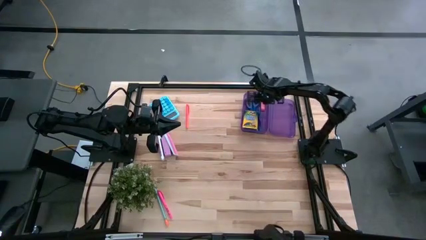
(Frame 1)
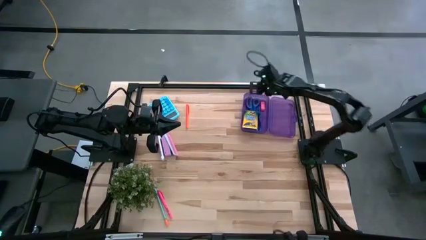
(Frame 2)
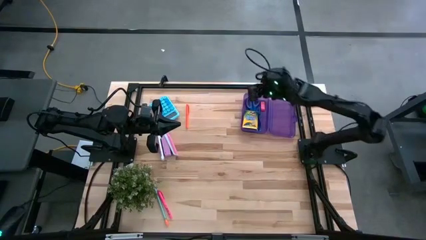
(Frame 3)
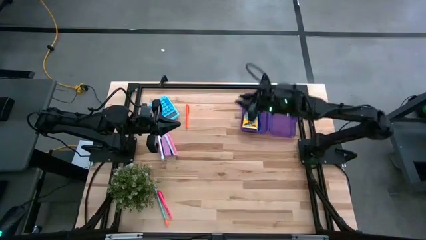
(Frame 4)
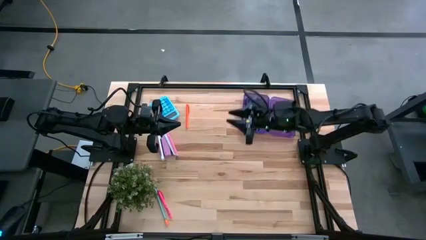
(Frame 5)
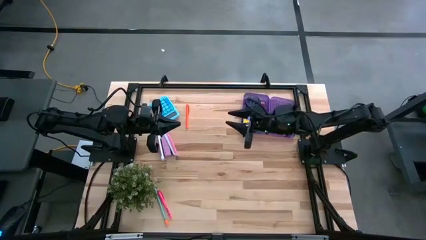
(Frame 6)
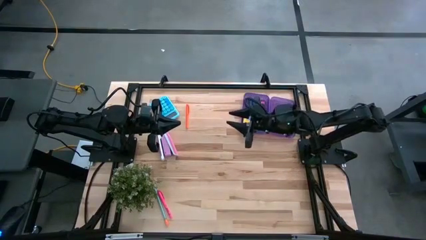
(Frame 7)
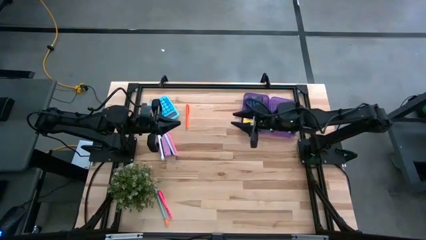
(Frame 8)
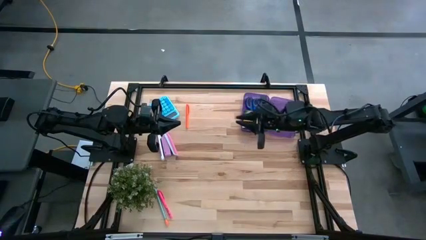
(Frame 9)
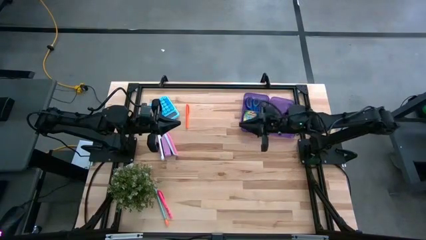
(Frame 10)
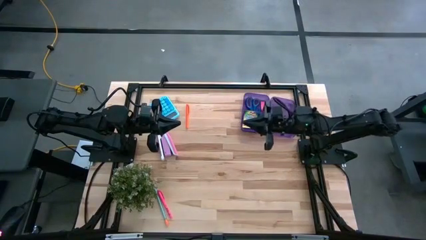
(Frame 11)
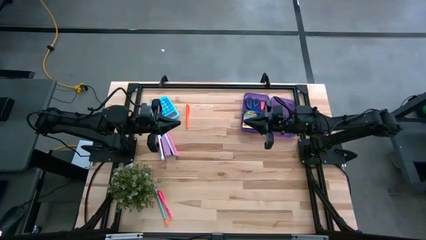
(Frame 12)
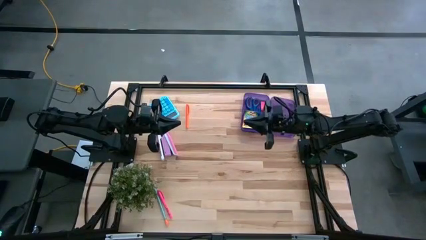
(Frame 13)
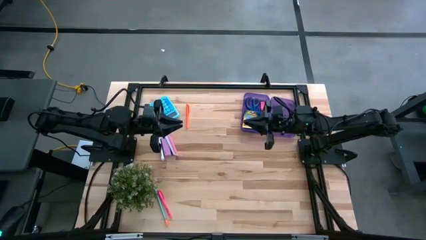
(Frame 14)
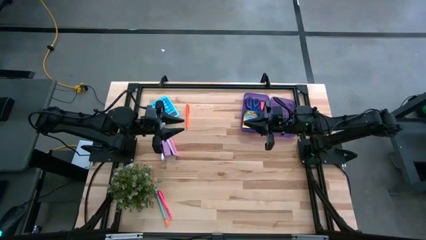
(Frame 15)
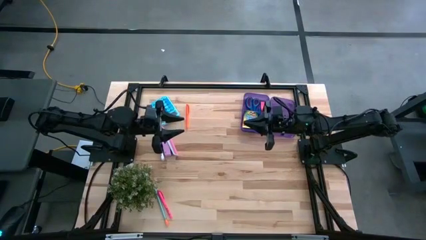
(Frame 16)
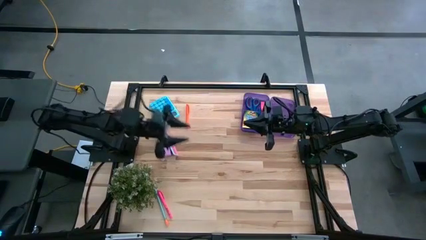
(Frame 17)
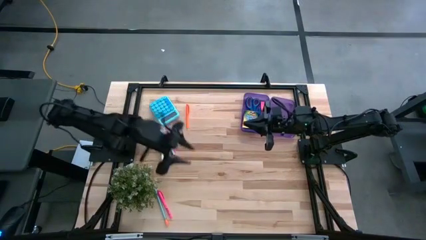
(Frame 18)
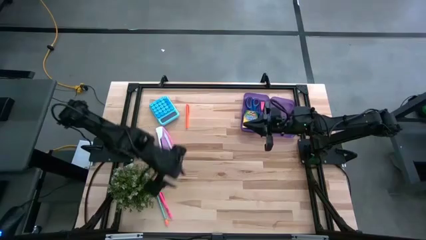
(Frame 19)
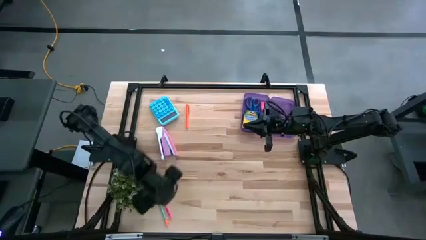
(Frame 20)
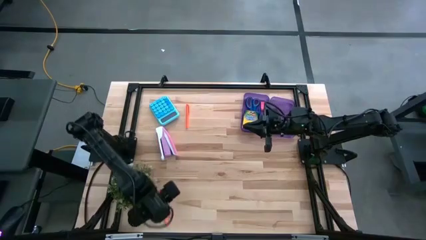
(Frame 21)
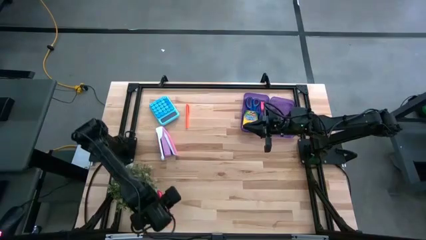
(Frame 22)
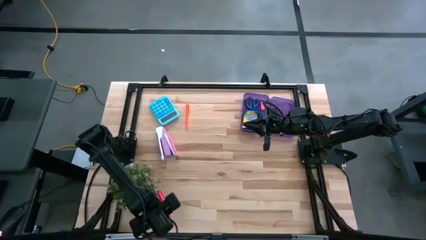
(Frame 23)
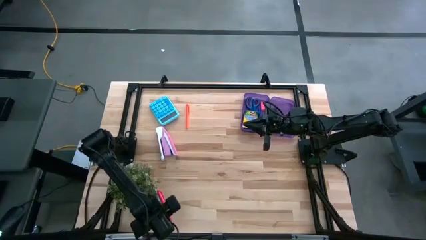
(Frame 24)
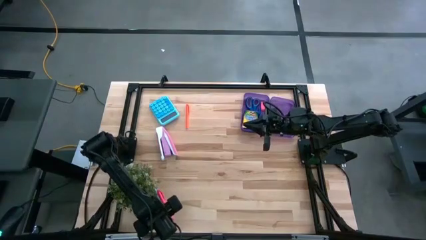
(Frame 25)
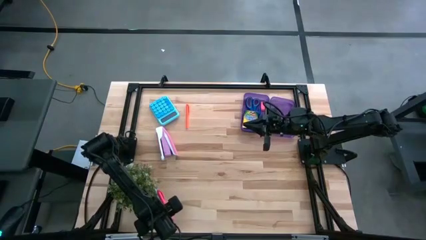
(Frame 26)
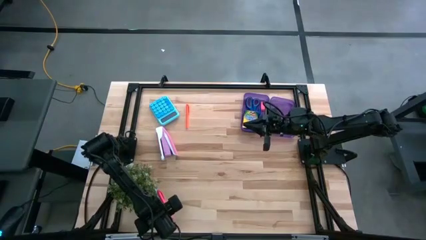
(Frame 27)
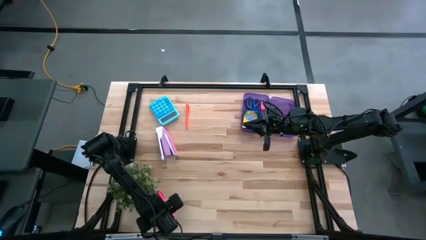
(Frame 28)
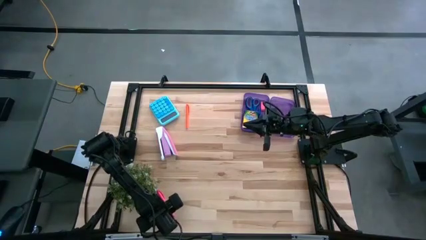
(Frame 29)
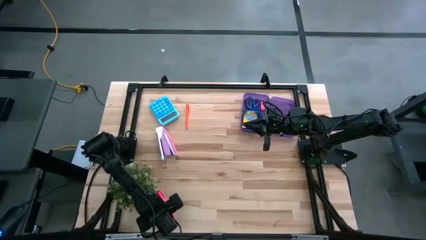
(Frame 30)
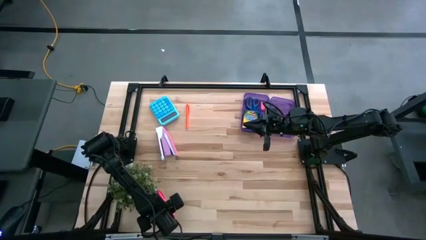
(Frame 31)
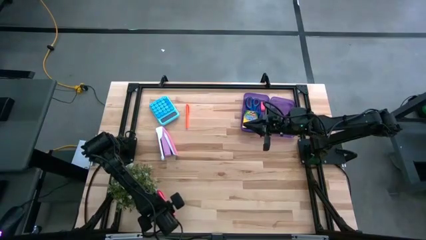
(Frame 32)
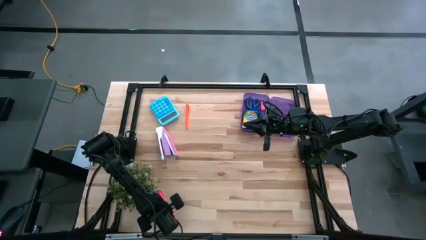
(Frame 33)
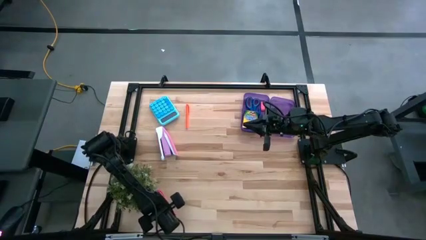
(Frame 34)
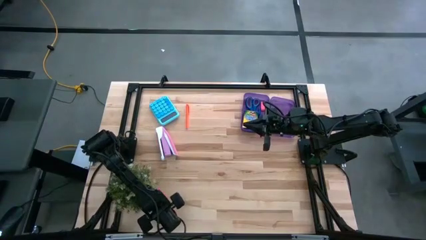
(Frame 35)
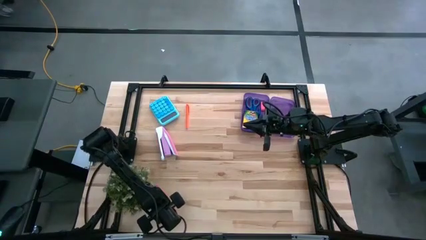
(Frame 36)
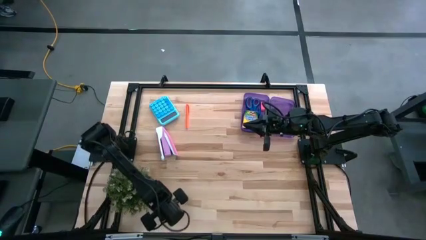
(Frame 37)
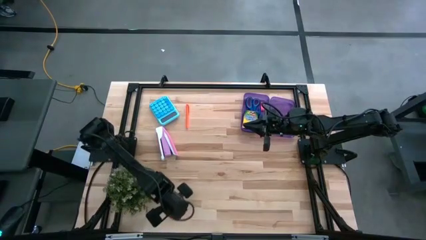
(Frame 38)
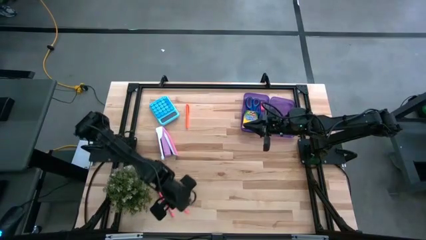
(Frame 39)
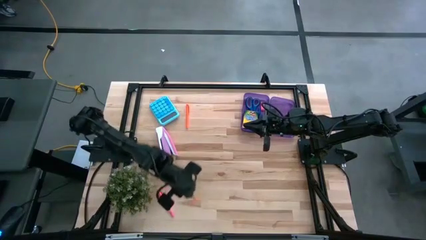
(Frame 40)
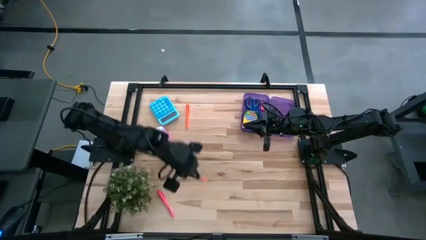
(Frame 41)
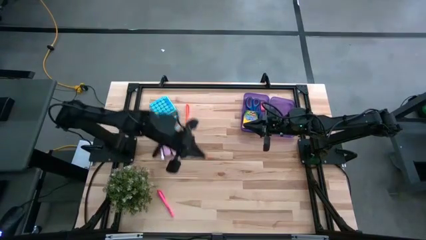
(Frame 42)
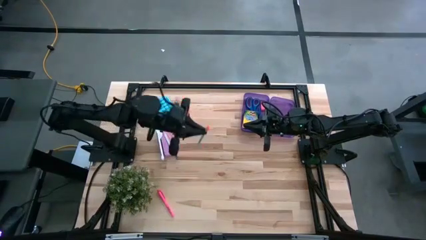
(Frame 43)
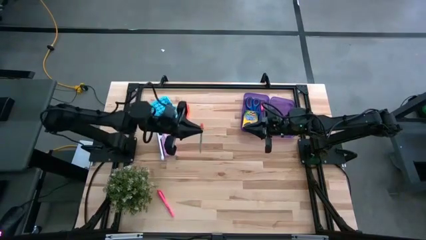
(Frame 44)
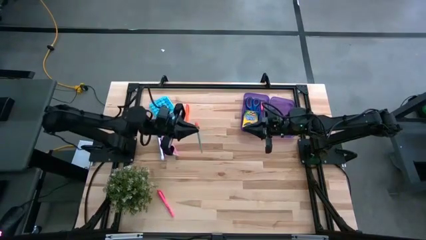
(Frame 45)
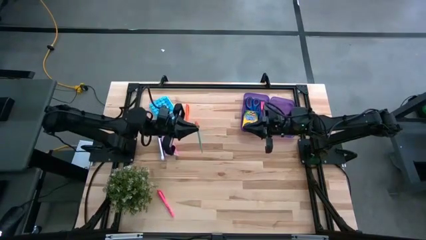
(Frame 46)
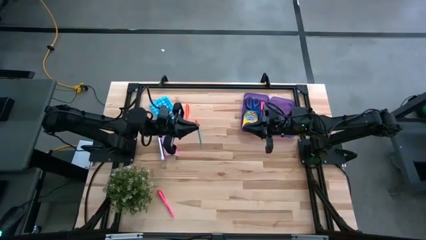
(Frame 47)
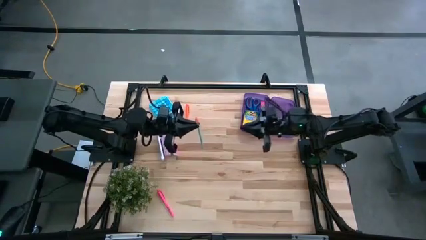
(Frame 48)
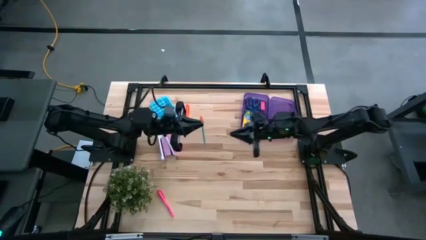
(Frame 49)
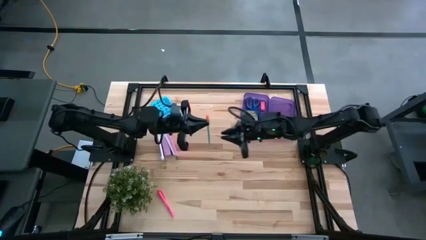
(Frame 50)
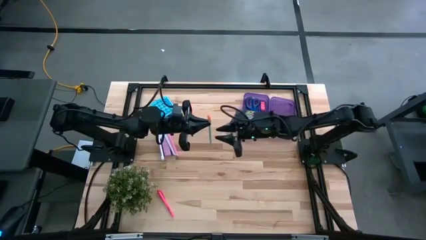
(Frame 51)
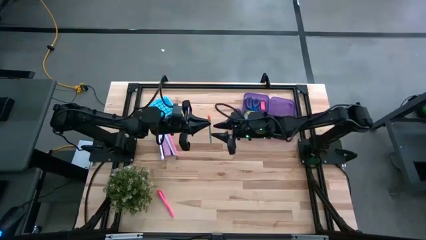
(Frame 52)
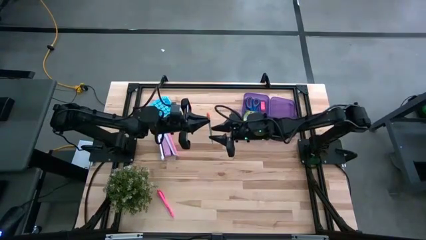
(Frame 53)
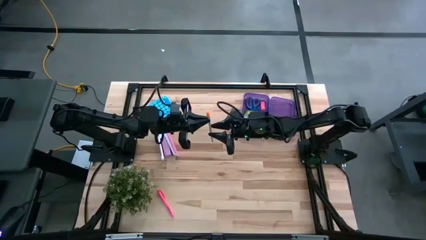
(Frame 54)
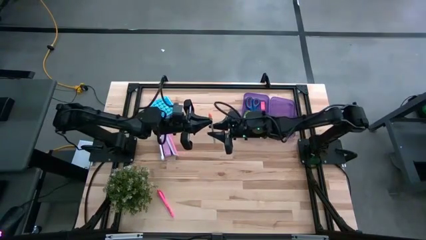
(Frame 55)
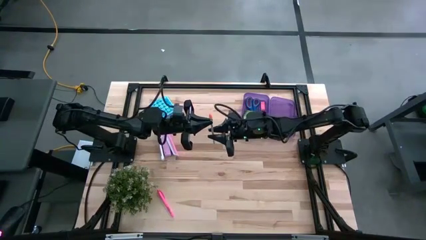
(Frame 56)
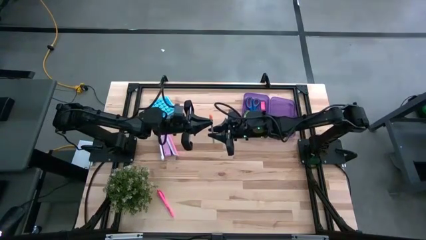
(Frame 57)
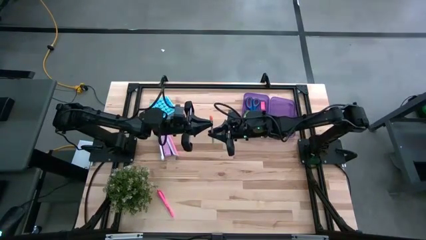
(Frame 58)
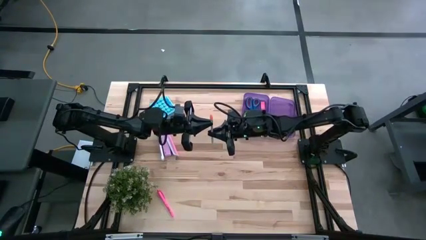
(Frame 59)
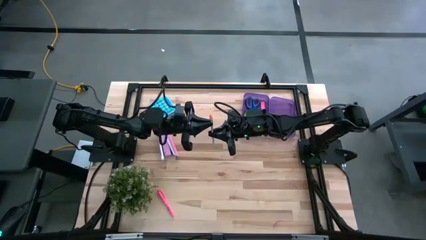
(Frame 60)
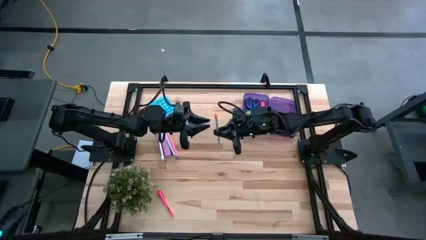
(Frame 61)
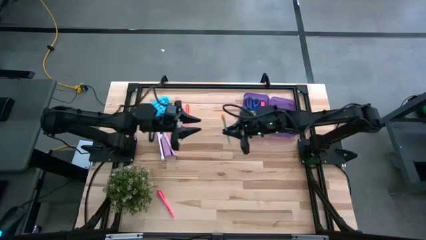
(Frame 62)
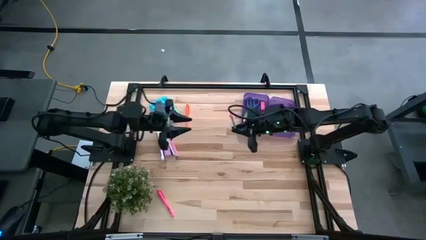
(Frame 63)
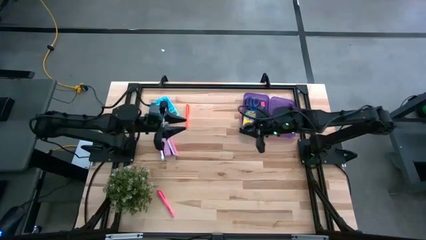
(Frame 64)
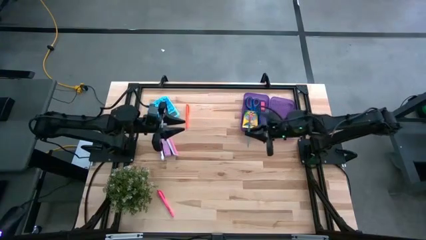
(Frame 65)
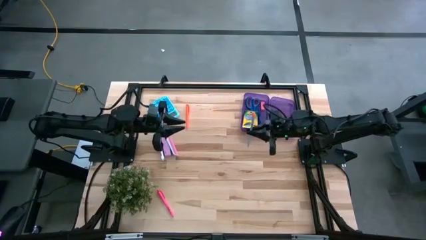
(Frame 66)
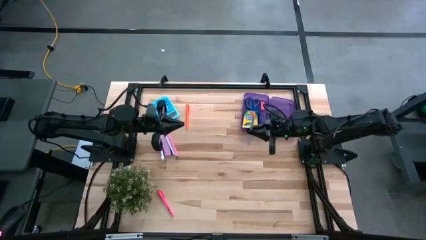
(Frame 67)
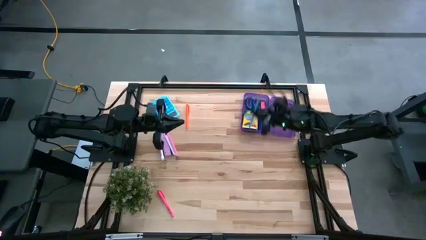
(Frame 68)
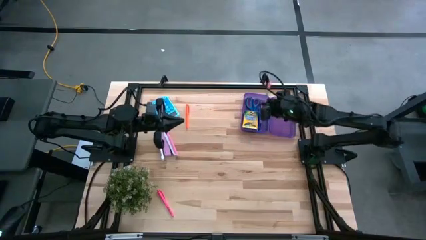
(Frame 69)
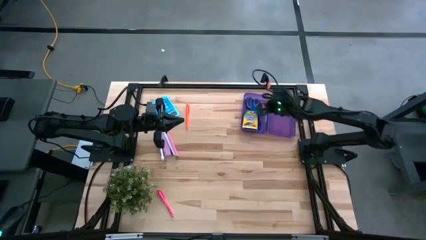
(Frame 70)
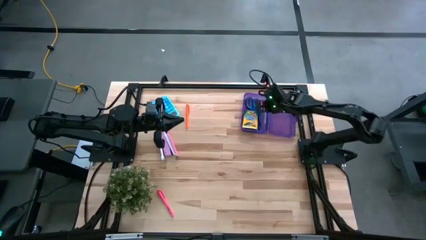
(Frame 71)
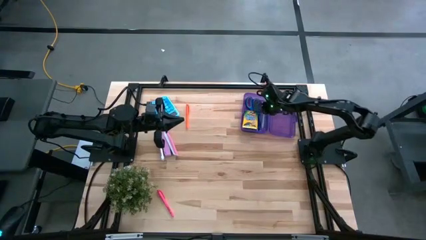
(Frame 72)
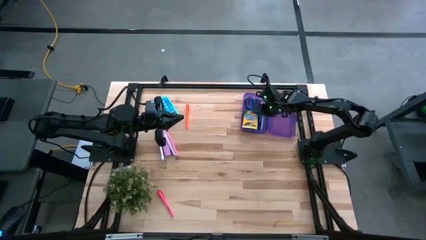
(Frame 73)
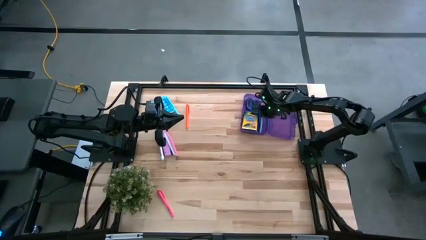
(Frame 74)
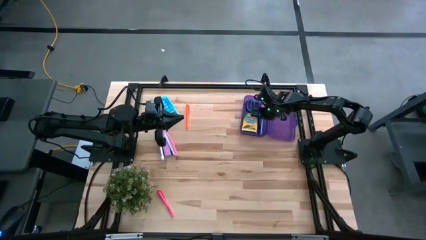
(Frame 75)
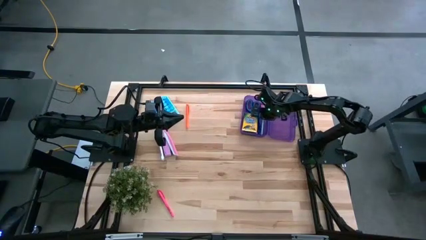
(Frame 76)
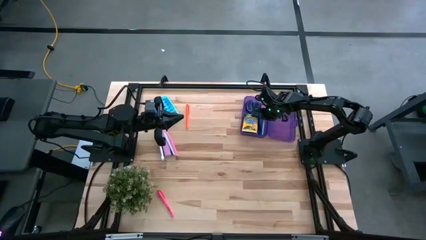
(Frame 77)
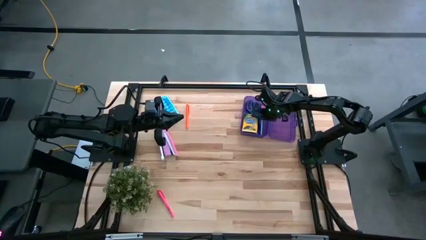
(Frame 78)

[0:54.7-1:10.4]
Task: Pack school essentials
Put the light blue pencil into the violet supply box
